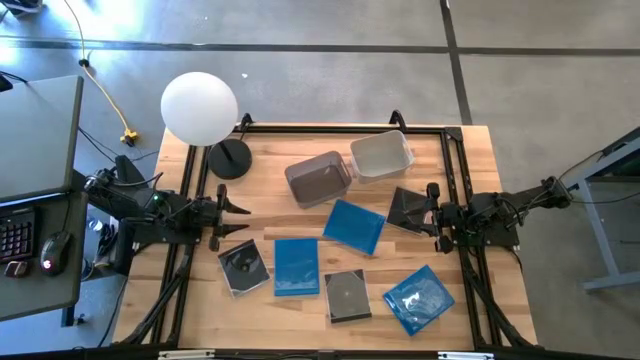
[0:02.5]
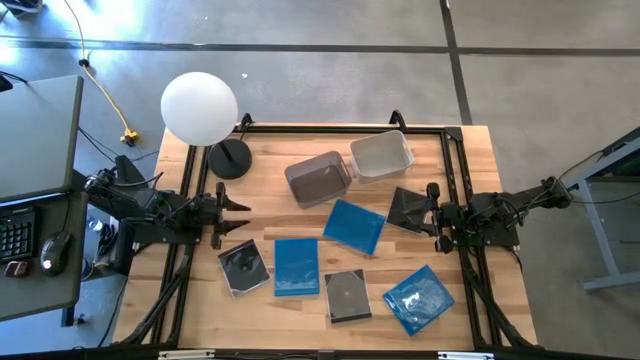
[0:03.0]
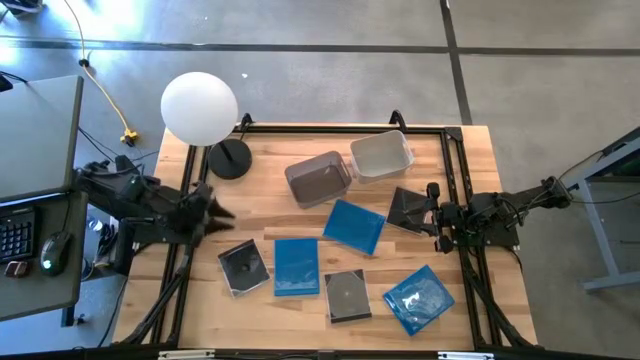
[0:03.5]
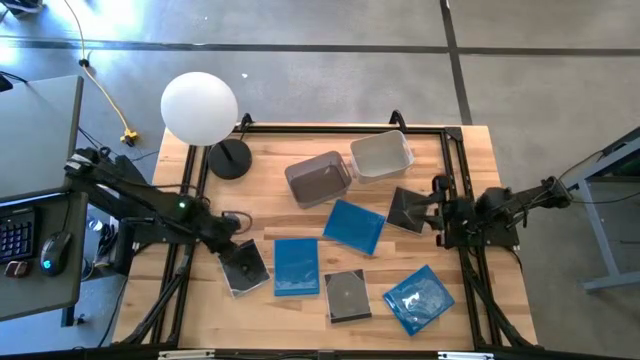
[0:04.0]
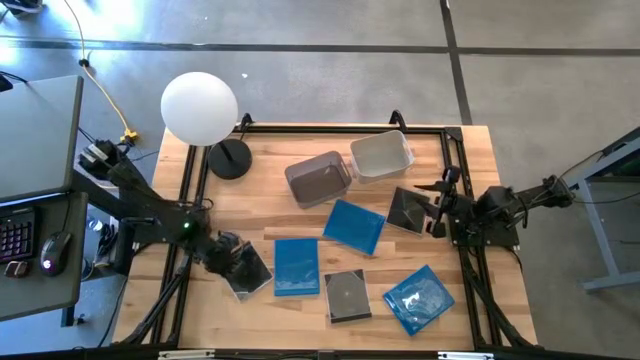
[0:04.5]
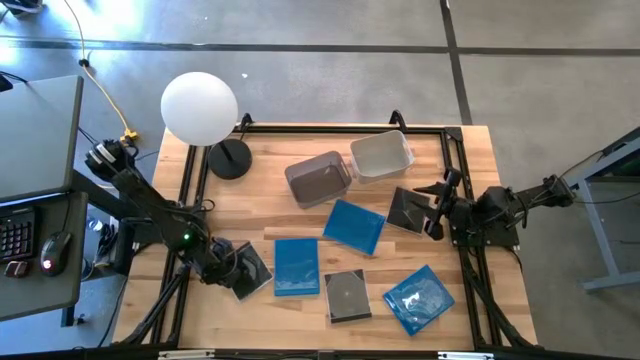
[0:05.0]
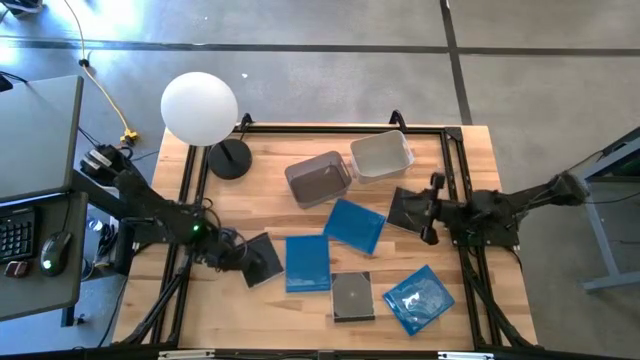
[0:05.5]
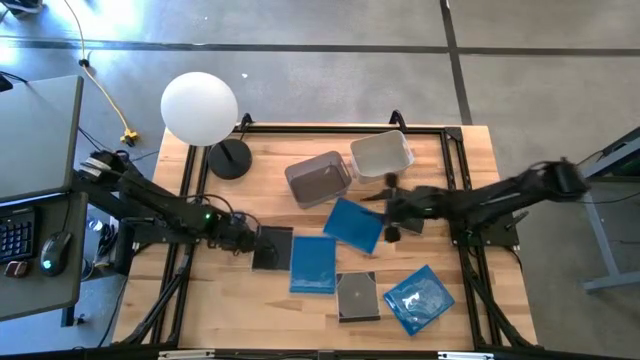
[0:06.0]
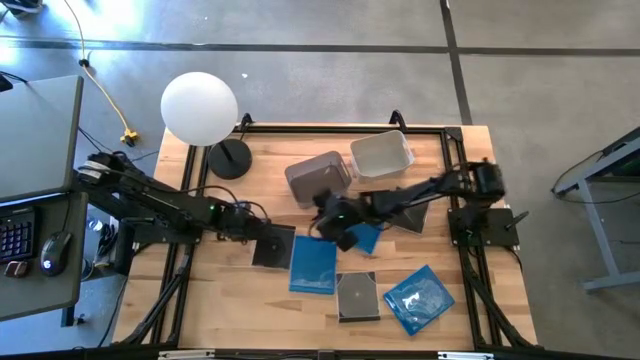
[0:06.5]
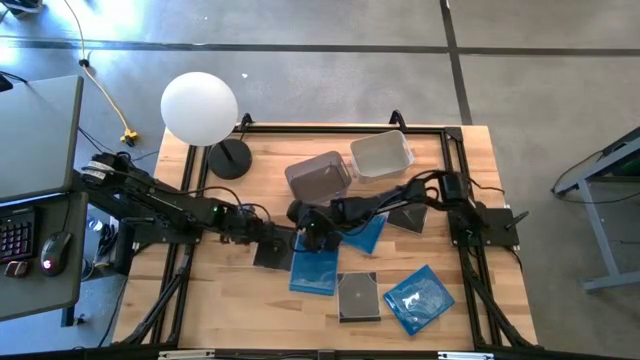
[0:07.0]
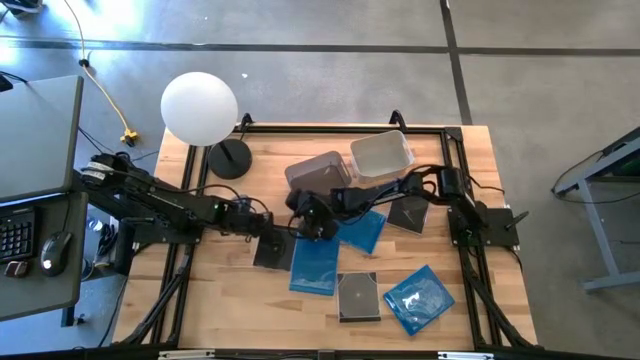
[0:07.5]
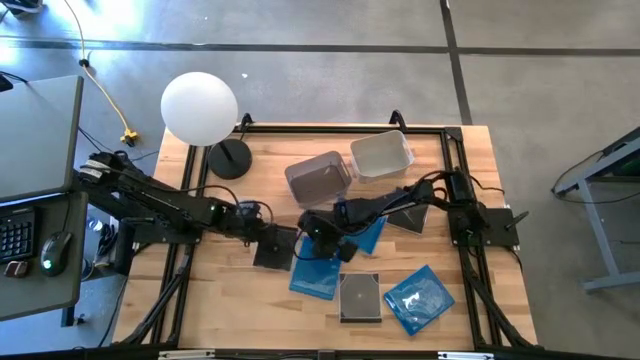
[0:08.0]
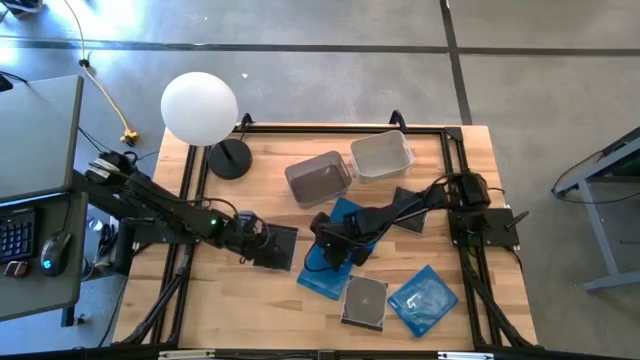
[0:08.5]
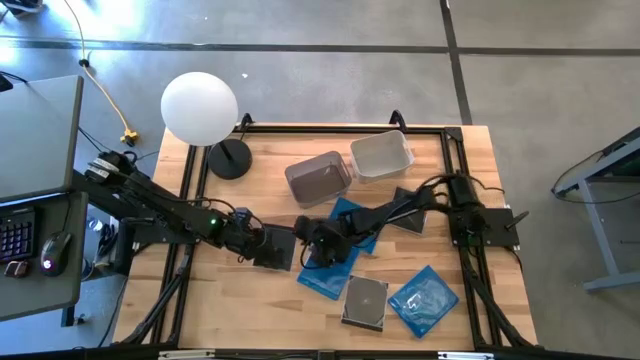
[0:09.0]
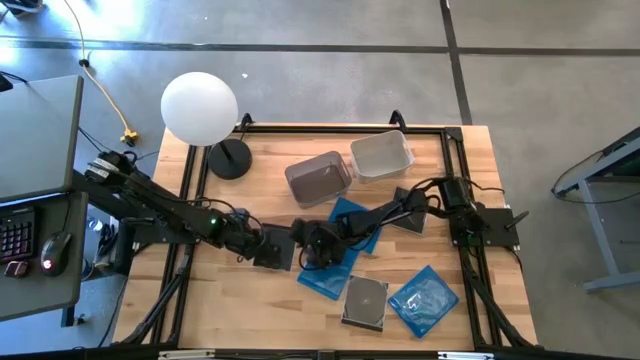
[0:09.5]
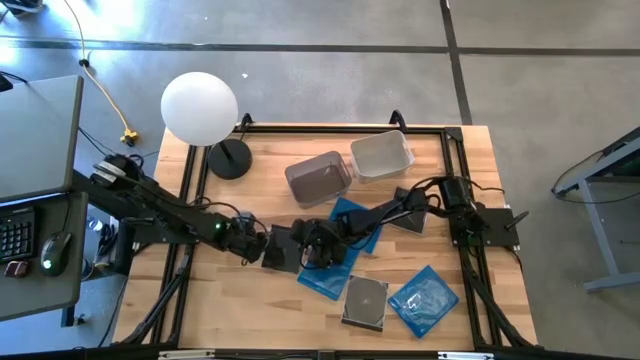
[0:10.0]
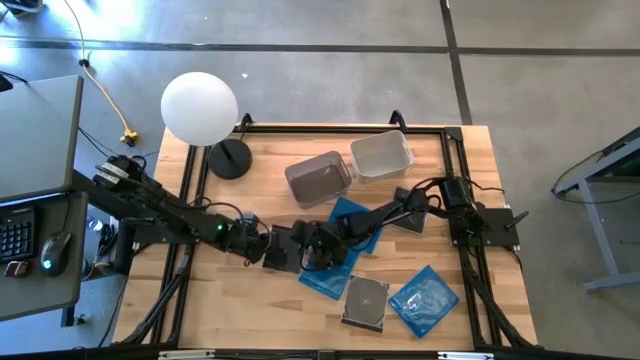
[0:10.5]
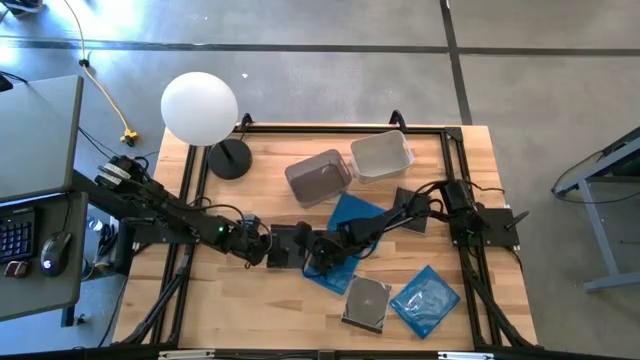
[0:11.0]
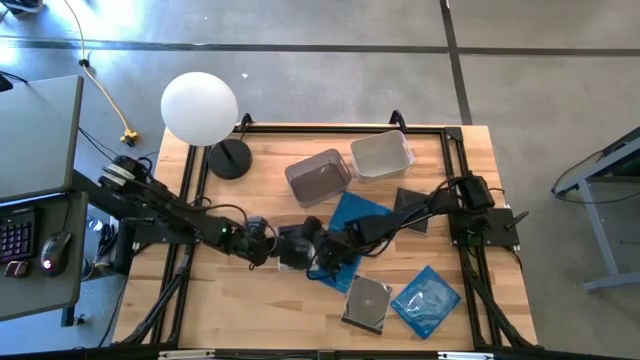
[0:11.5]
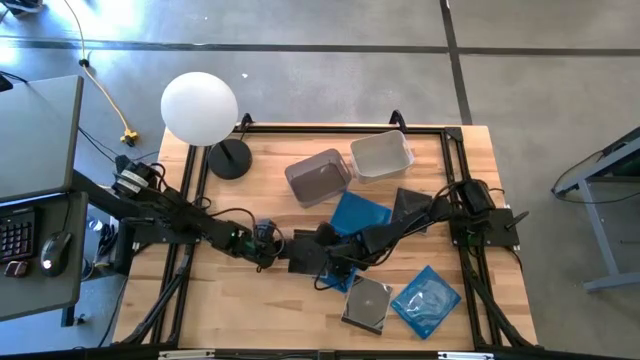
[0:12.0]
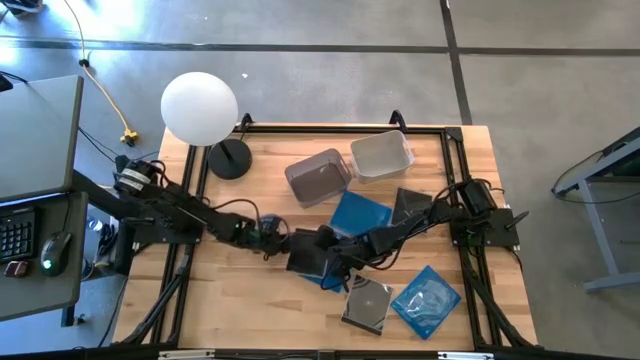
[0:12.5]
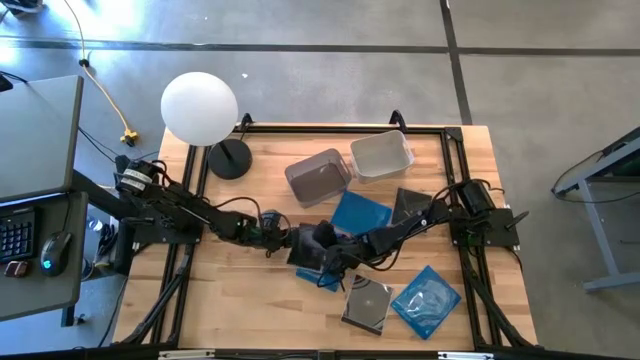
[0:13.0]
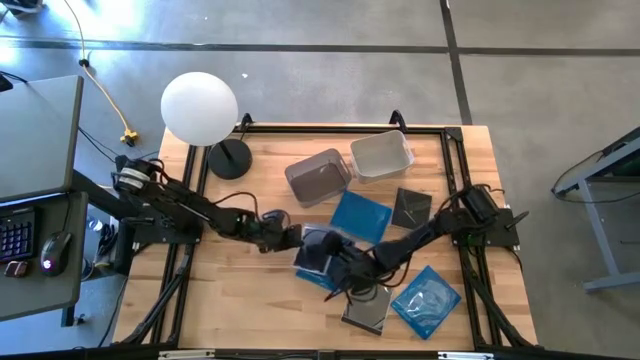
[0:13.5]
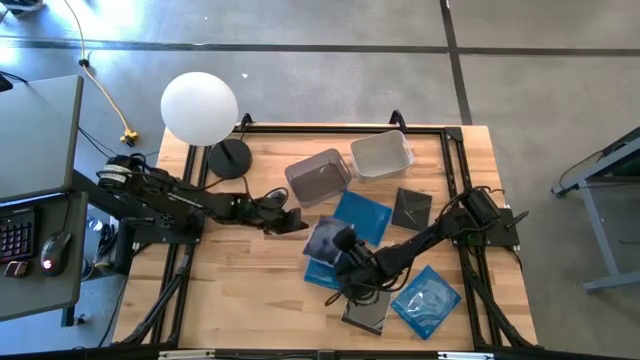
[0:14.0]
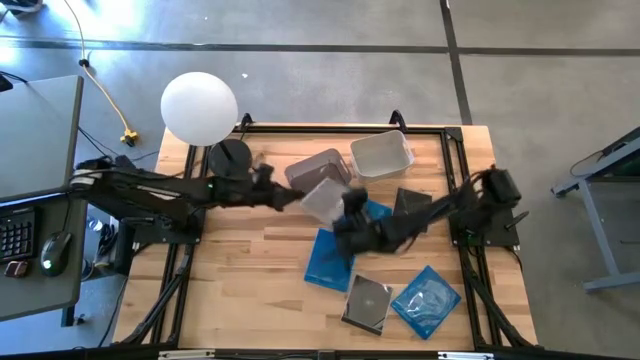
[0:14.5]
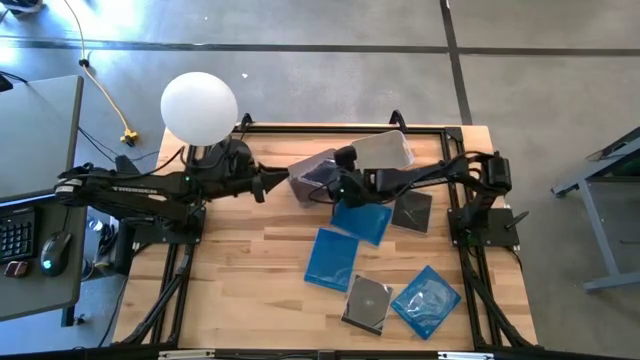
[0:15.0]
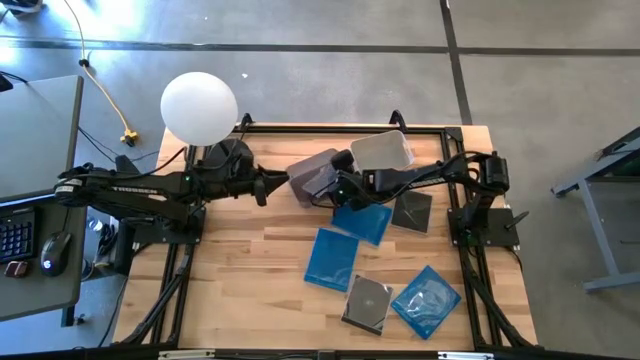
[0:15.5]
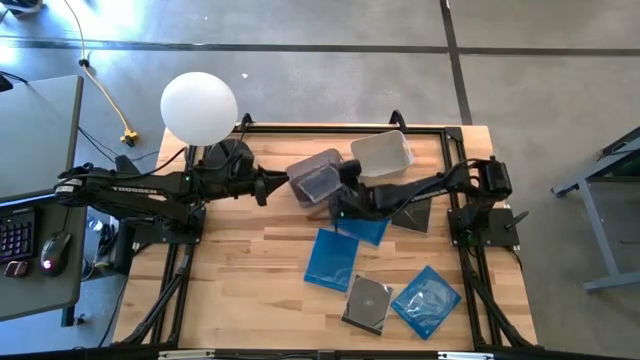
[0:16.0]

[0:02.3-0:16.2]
Task: Pick & place jewel cases by type
Put the bottom left black CD case into the black bin

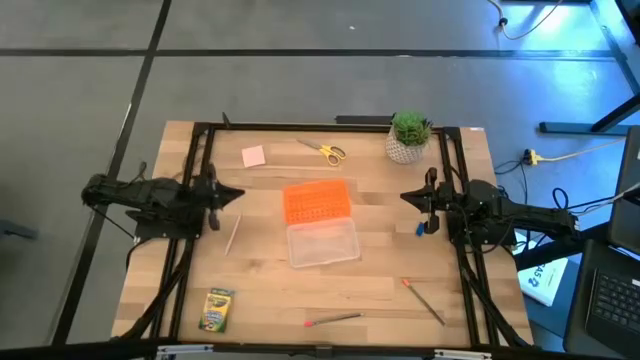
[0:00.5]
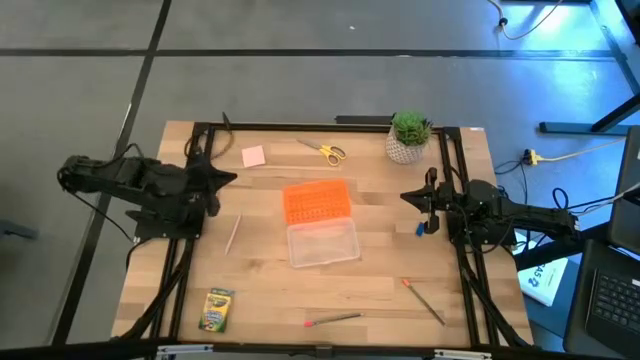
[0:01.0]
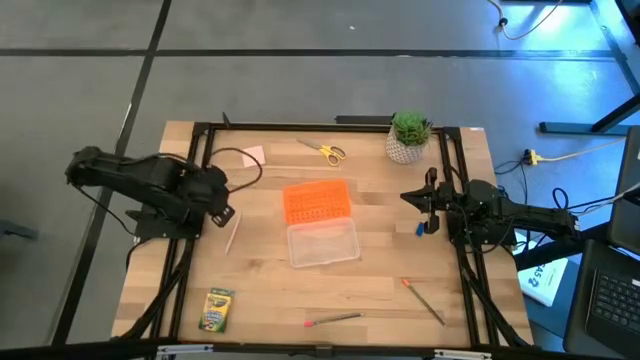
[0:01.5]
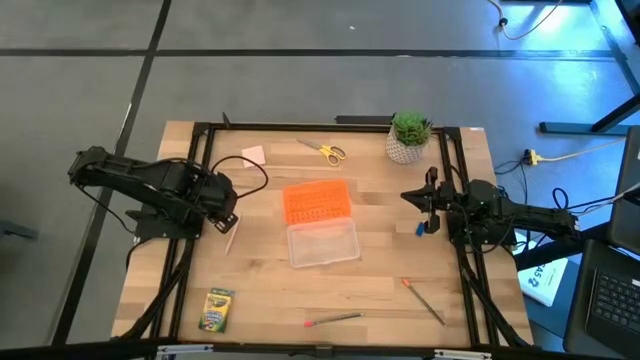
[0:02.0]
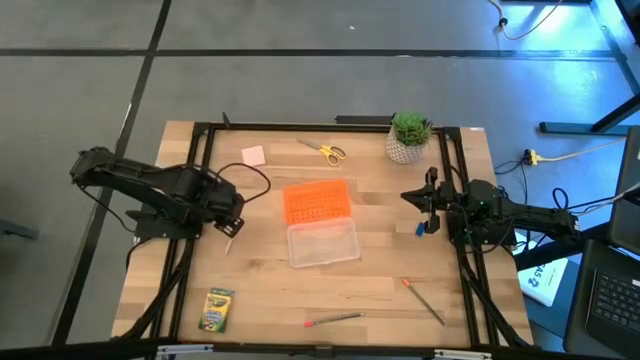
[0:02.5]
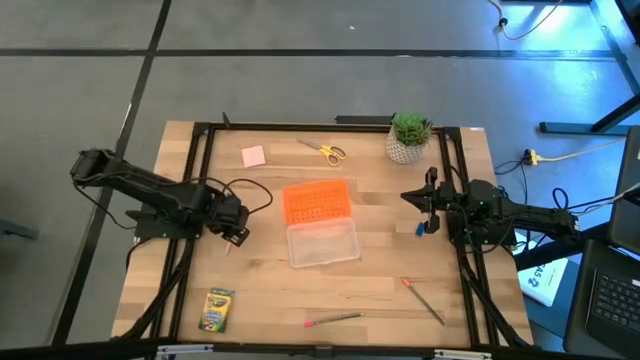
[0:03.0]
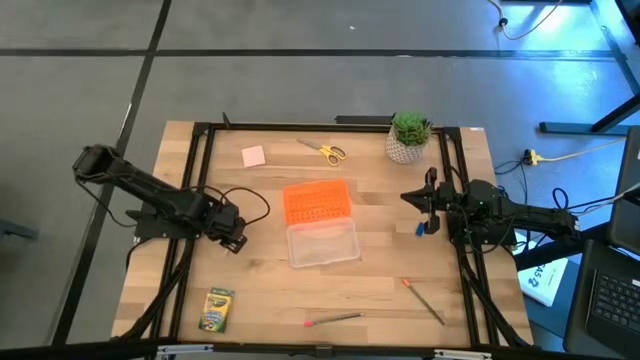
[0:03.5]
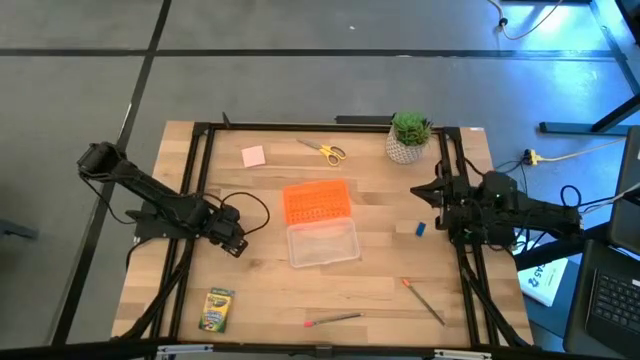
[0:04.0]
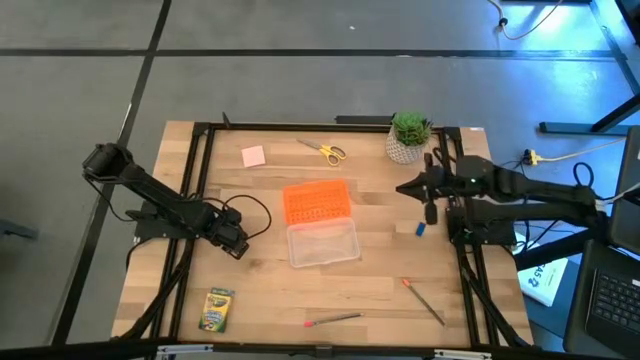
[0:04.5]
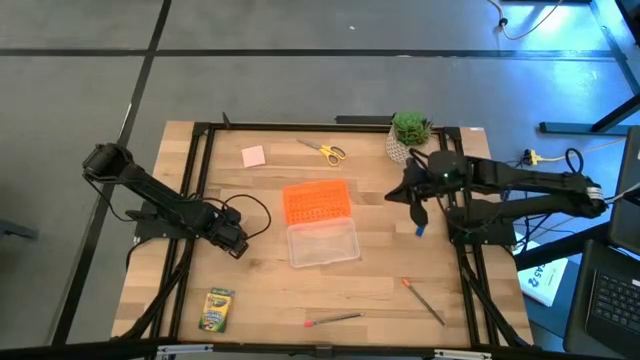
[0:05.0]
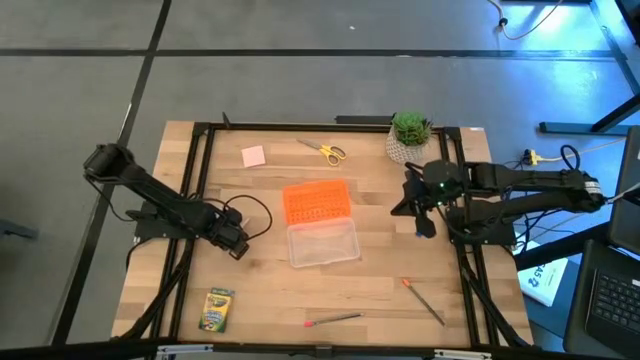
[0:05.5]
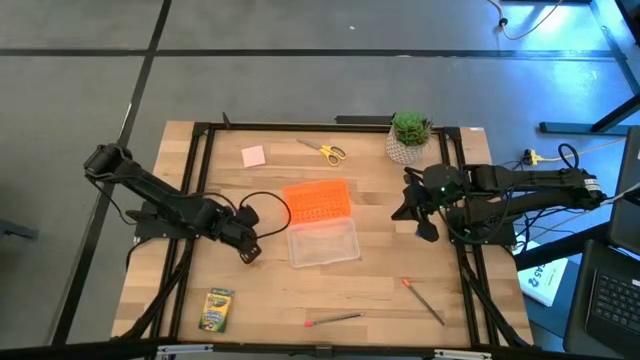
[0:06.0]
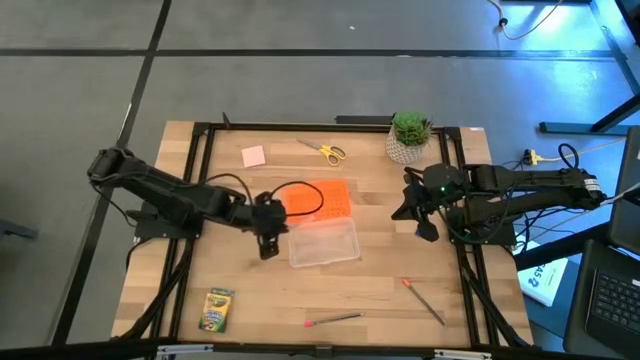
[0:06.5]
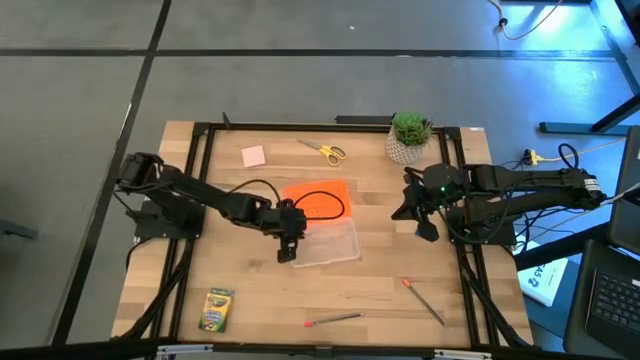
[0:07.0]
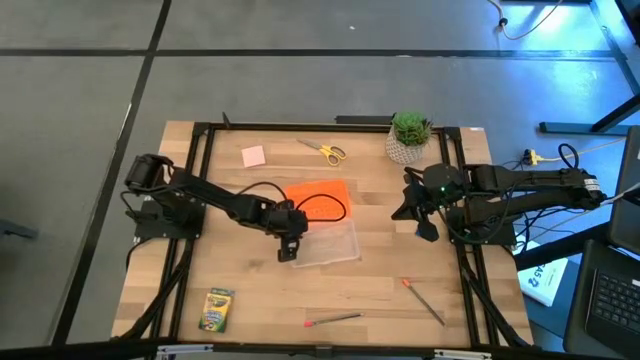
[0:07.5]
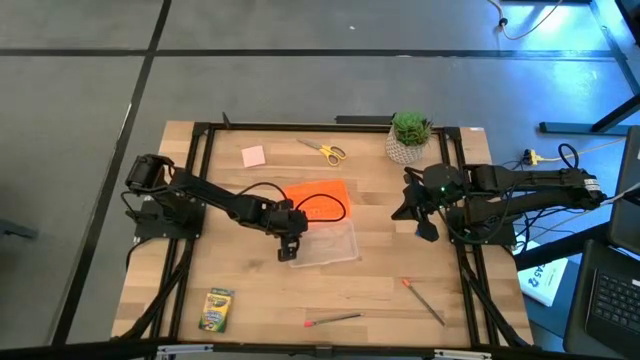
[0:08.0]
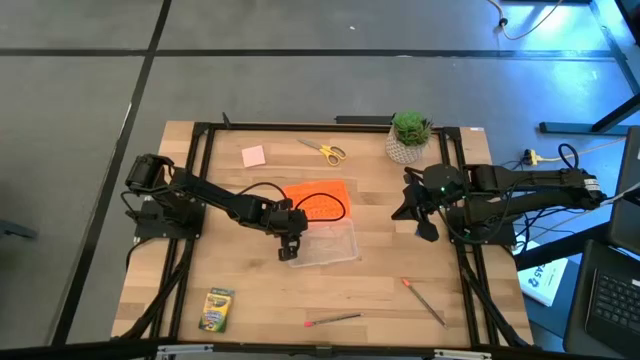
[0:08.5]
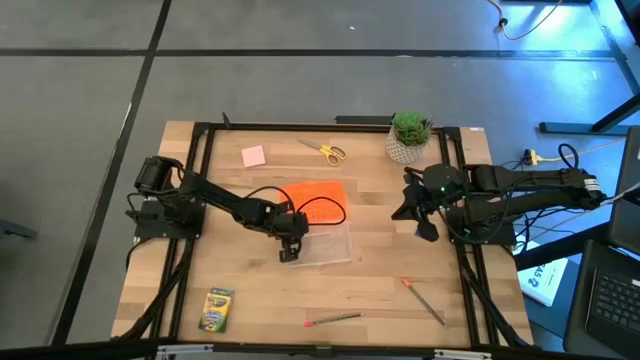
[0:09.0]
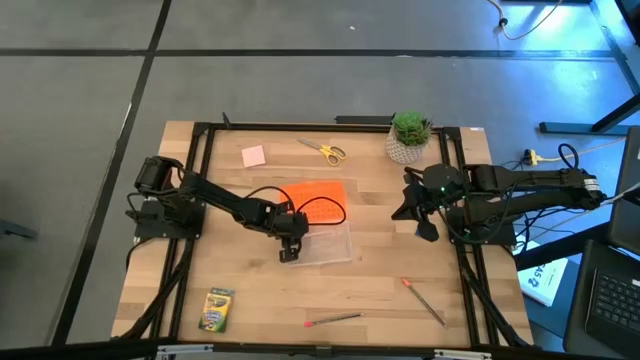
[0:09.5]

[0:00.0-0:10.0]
Task: Pack school essentials
Put the pink pen into the supply box
